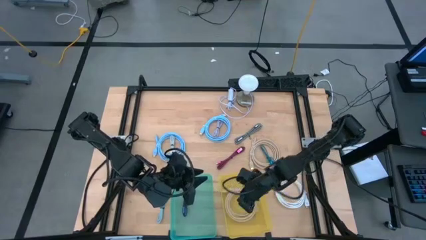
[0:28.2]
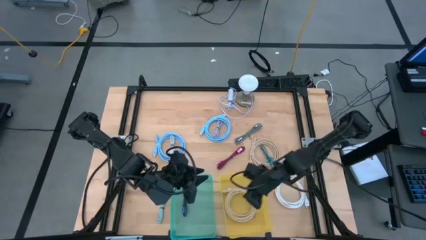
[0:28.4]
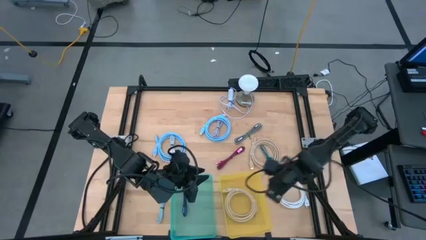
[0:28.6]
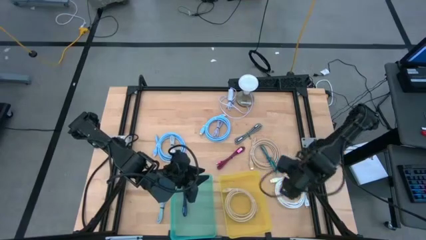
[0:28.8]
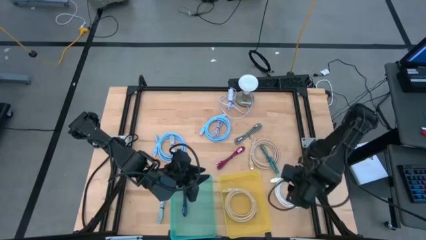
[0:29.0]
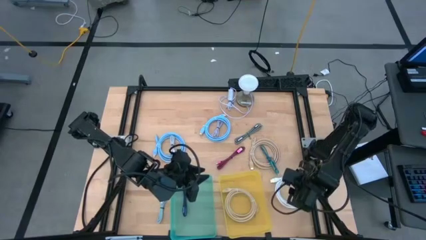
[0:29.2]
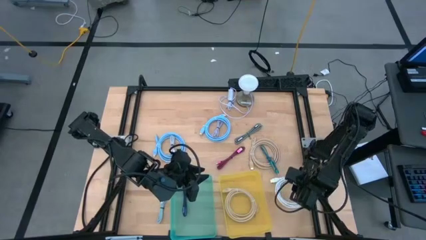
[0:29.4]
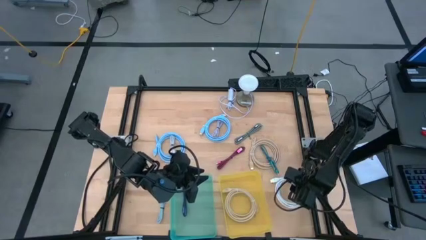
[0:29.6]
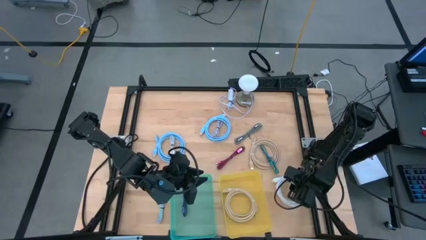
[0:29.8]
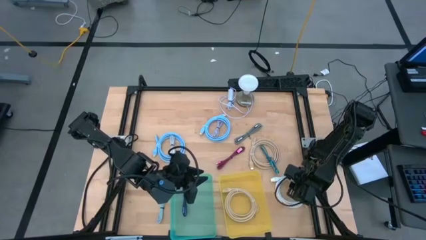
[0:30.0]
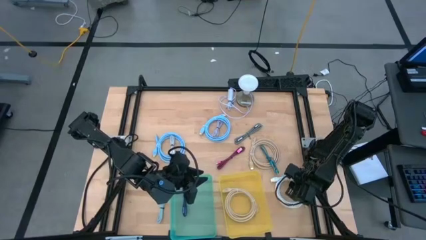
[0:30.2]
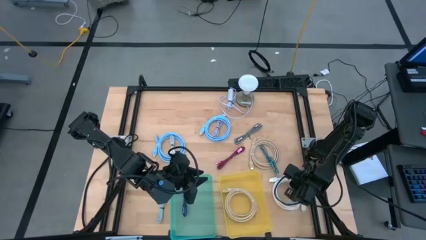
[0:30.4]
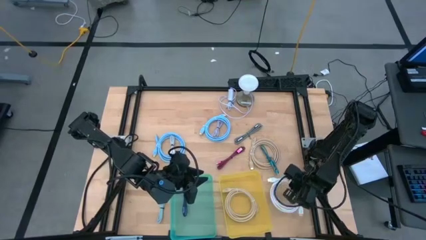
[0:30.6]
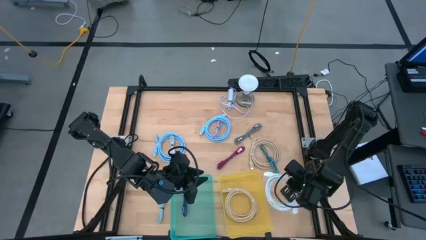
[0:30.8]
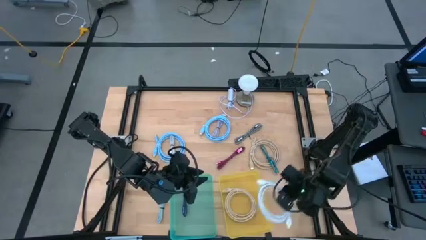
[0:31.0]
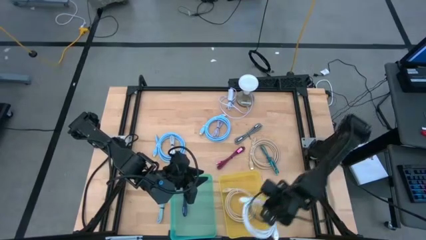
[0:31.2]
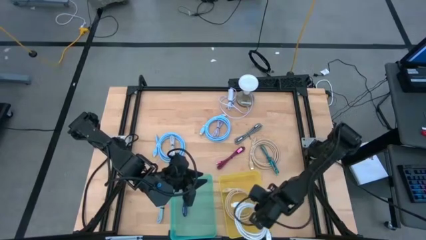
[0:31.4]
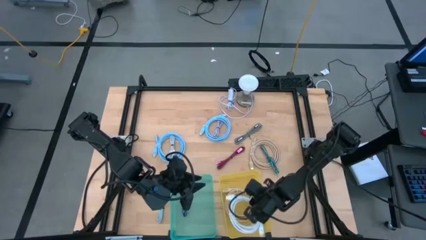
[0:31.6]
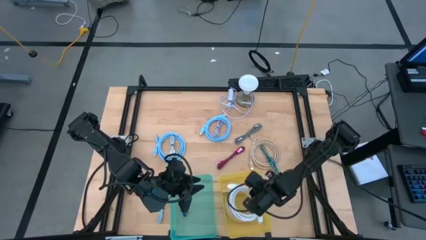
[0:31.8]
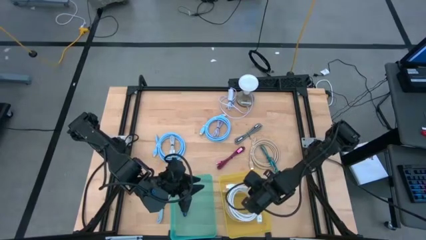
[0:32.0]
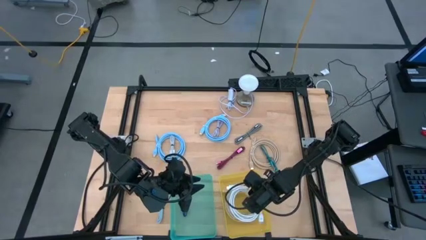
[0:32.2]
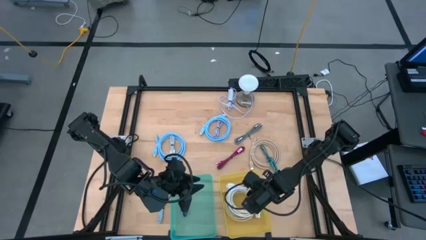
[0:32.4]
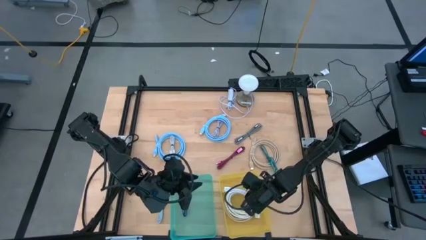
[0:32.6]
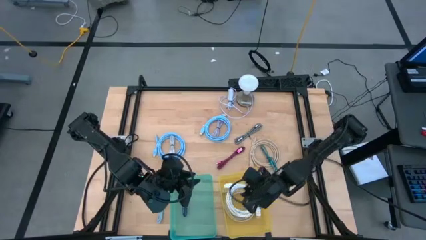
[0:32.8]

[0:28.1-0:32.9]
Task: Pick & Place USB Port
Put the white hdmi cable into the yellow bin

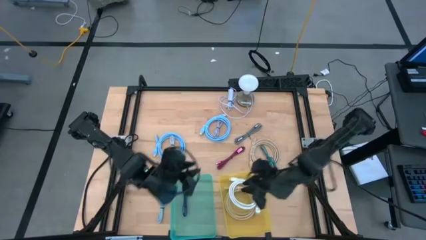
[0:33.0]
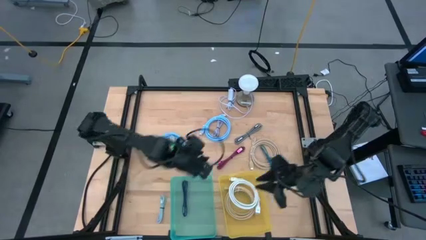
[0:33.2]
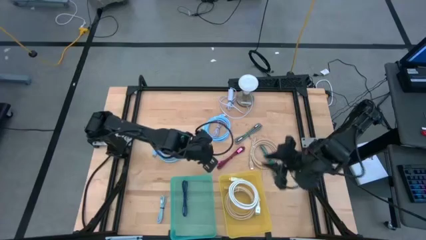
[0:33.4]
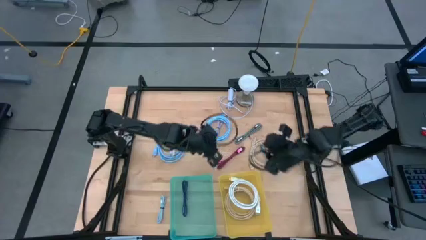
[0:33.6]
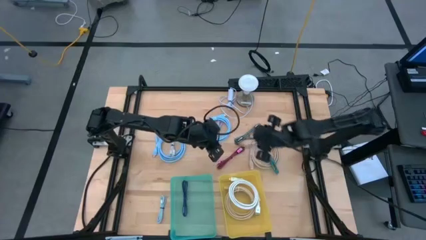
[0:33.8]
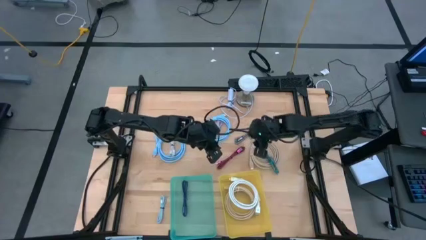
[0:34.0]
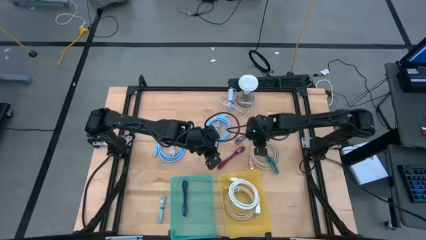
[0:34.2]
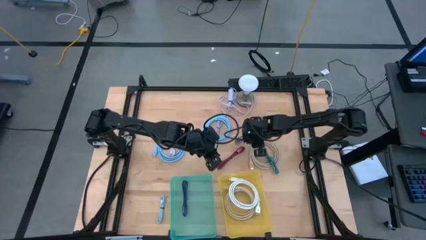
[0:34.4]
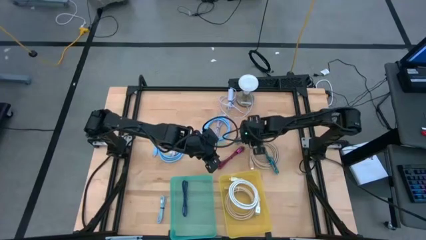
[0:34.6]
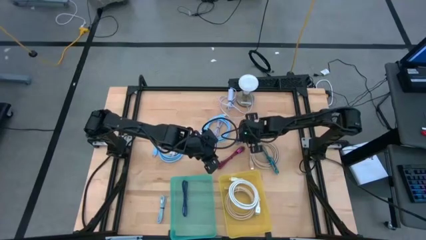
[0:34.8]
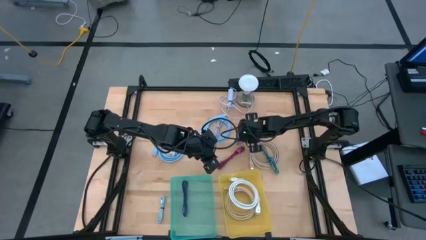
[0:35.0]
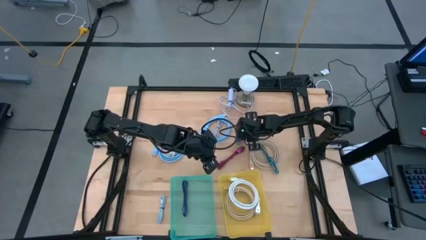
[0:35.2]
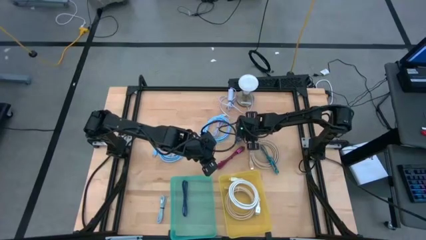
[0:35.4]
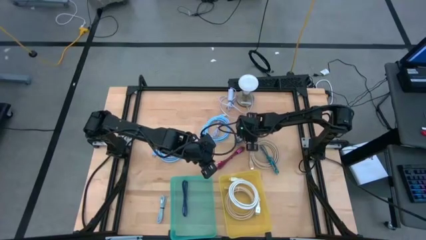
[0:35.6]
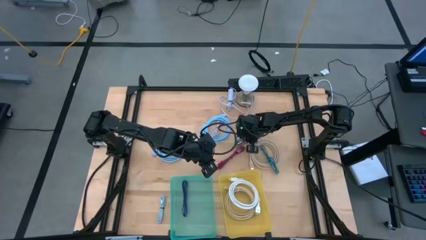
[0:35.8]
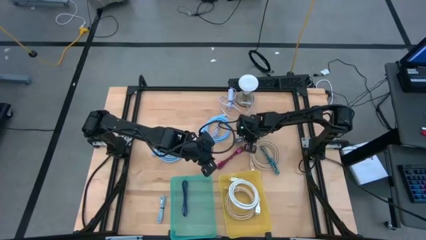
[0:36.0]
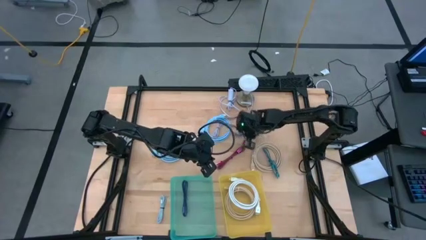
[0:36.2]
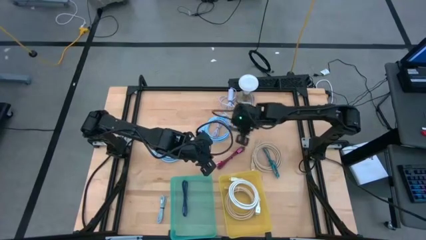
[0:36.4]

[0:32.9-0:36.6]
Put the black charger cable into the green bin

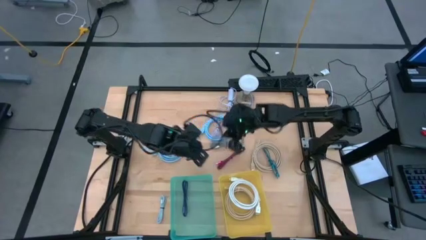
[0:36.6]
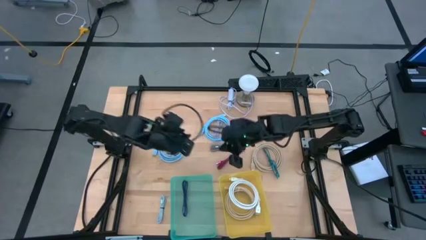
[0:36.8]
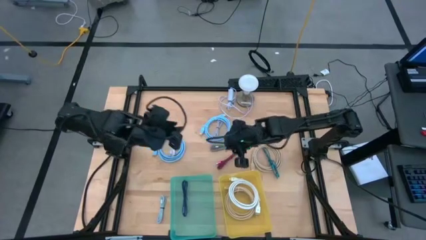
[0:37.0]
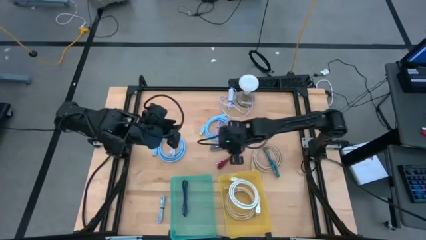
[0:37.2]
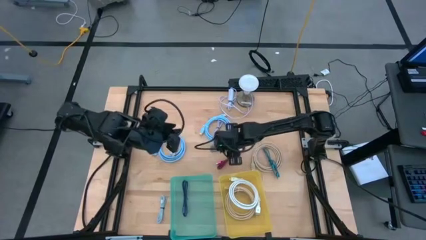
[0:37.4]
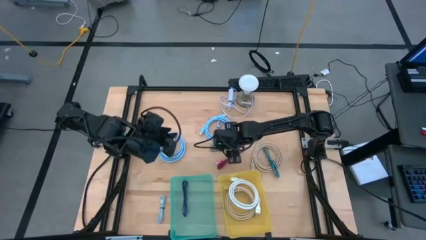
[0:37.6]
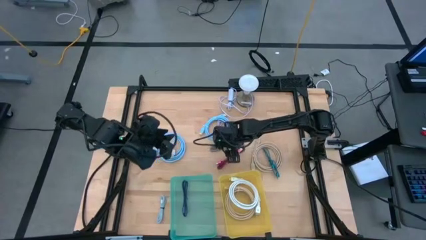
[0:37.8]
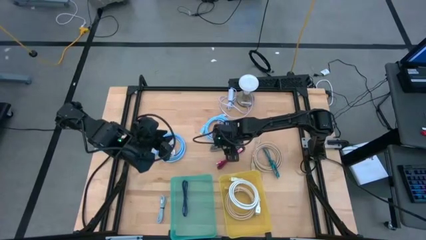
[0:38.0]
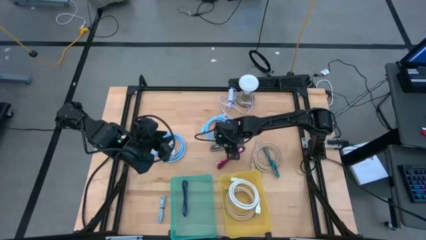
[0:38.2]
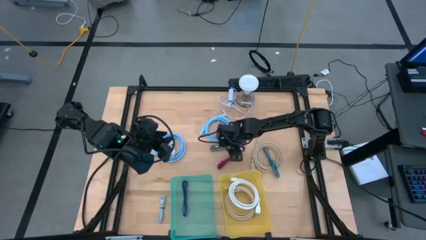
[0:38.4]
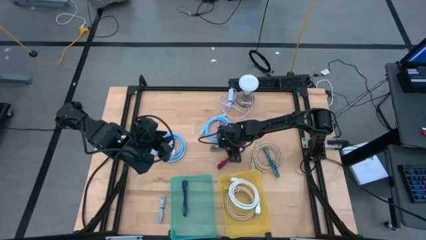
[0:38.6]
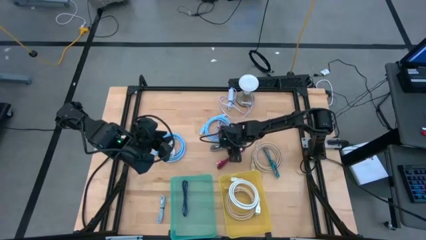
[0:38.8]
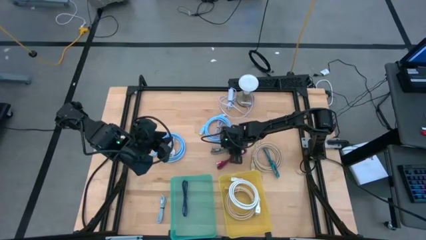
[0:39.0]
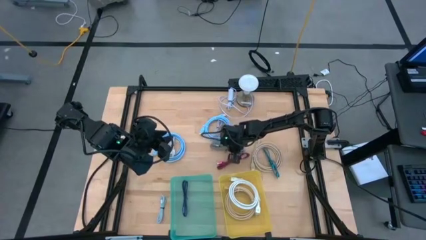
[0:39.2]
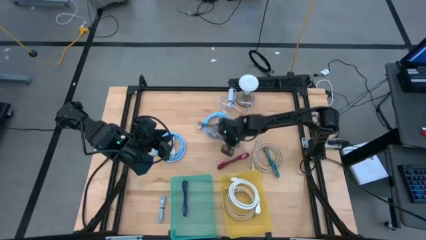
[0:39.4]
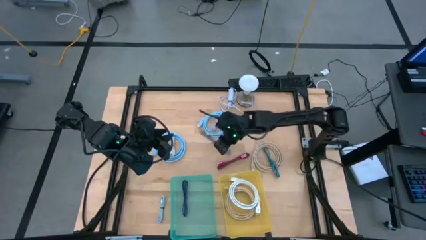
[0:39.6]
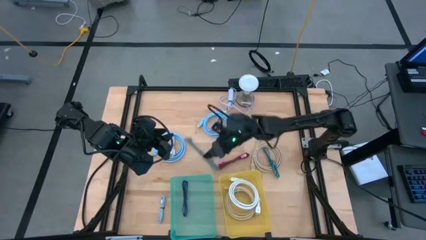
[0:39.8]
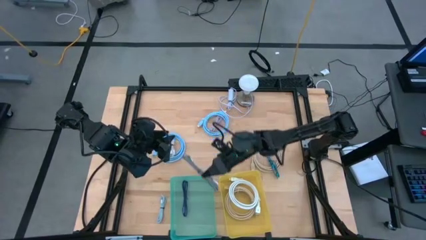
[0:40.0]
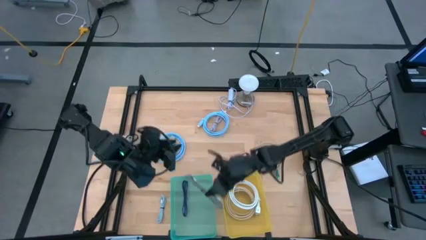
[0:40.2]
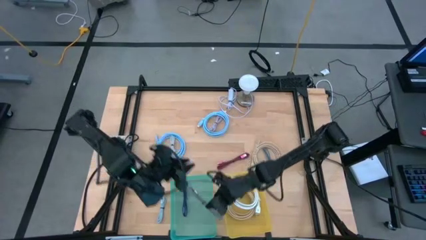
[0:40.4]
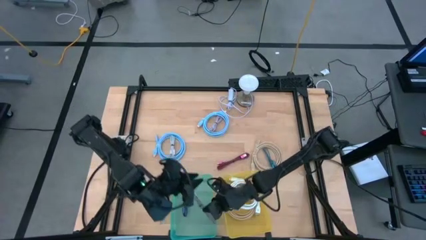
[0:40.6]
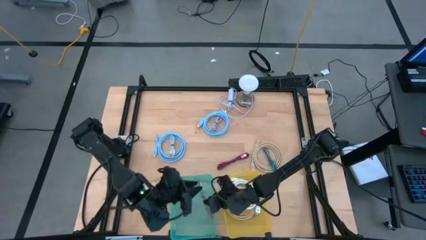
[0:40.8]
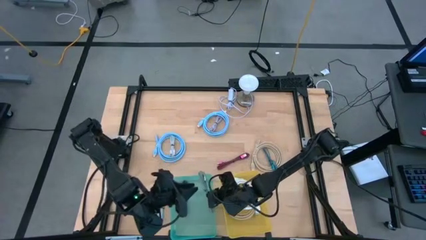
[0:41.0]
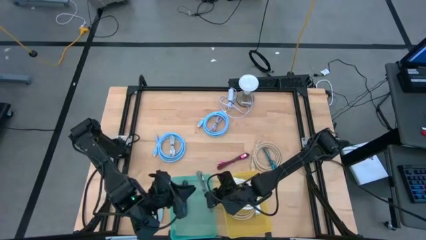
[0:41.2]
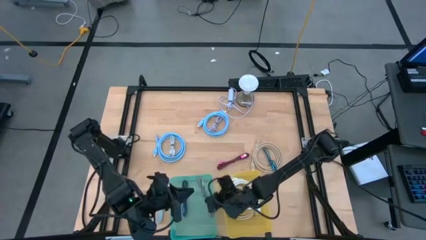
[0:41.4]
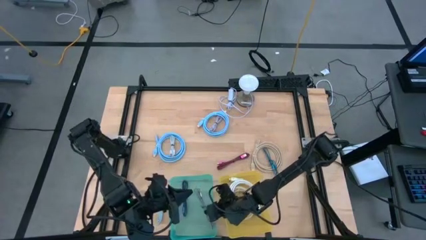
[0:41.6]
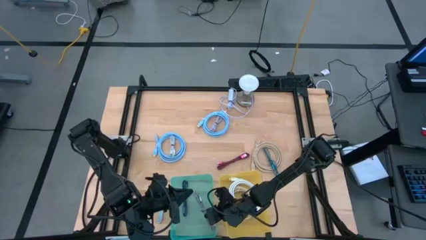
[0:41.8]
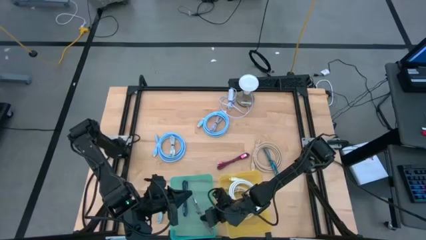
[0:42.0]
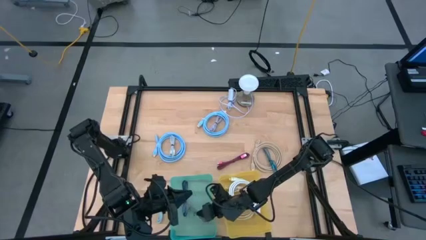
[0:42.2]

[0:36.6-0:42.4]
Put the black charger cable into the green bin
